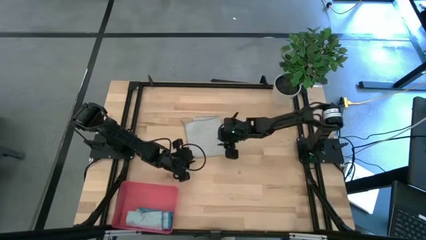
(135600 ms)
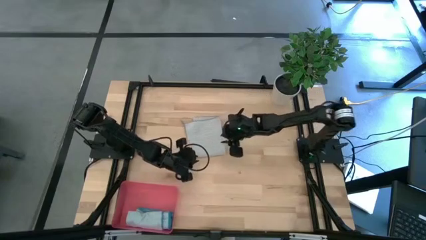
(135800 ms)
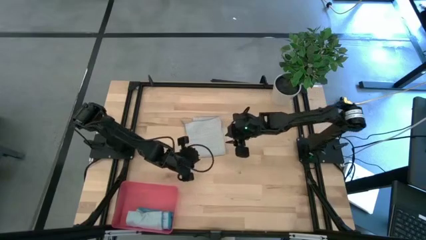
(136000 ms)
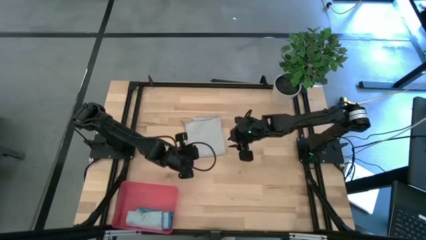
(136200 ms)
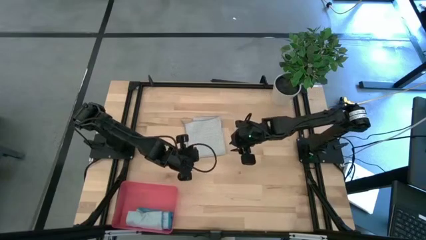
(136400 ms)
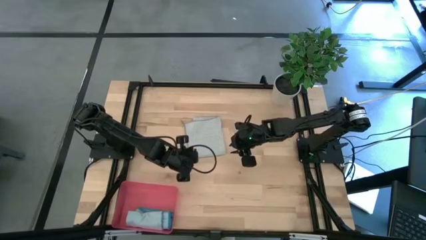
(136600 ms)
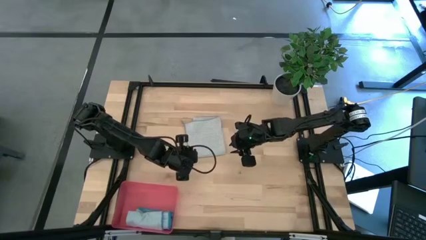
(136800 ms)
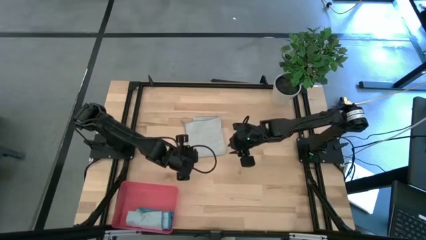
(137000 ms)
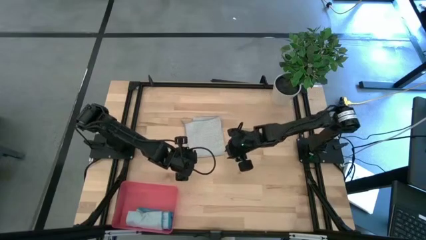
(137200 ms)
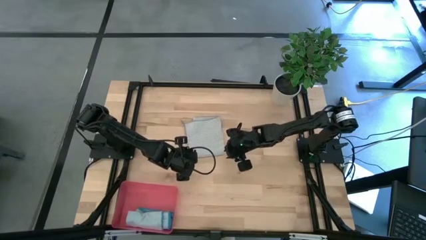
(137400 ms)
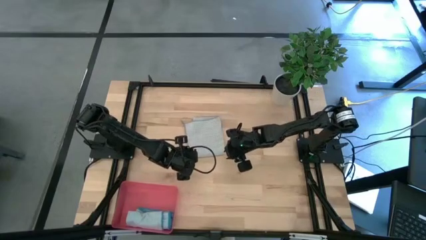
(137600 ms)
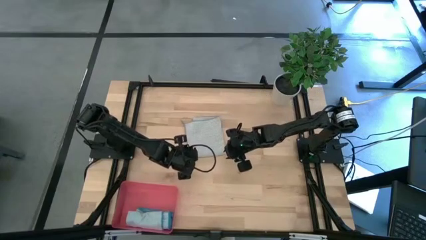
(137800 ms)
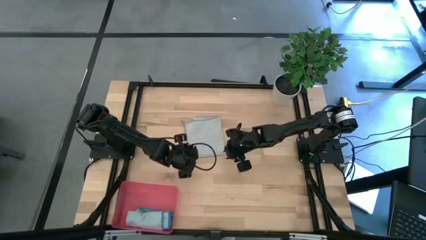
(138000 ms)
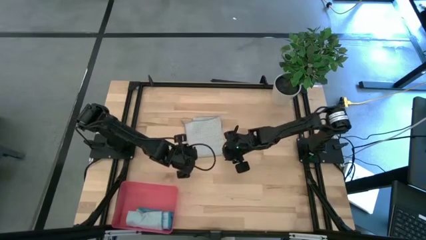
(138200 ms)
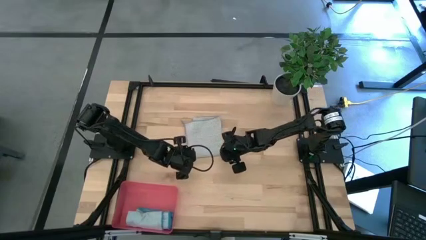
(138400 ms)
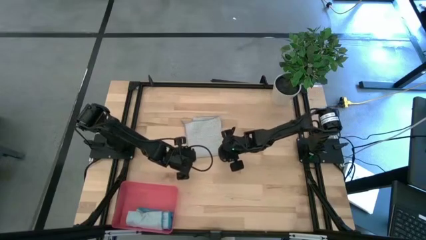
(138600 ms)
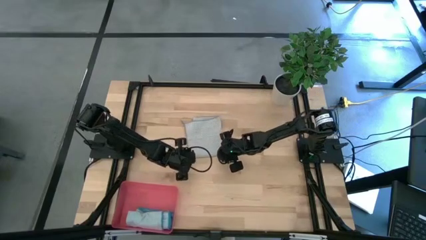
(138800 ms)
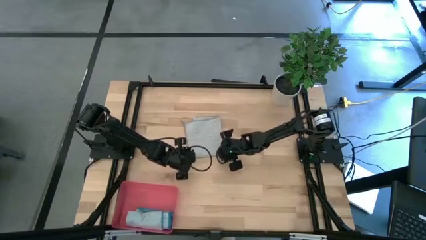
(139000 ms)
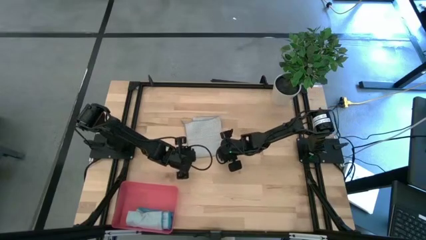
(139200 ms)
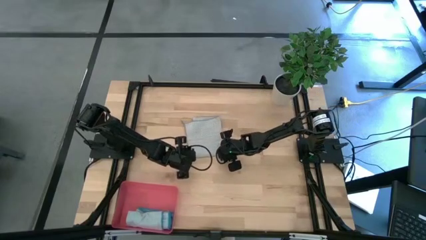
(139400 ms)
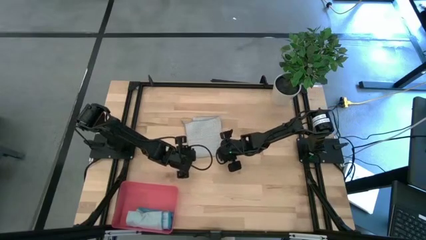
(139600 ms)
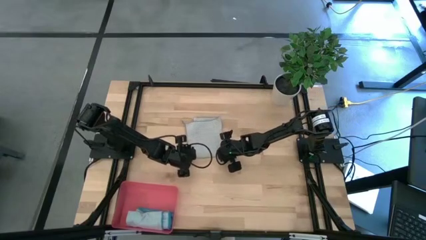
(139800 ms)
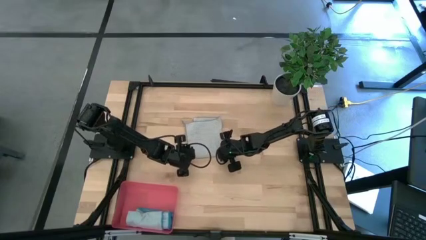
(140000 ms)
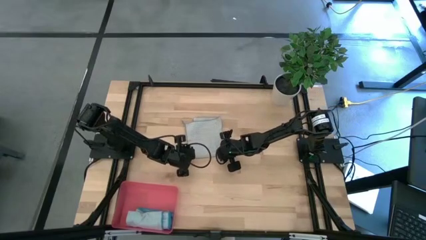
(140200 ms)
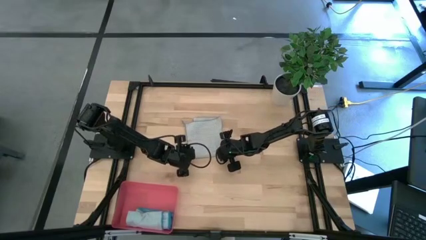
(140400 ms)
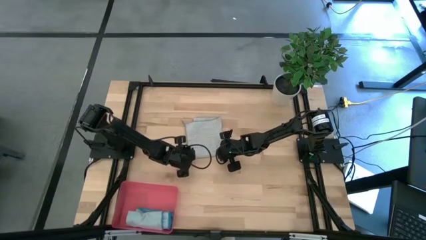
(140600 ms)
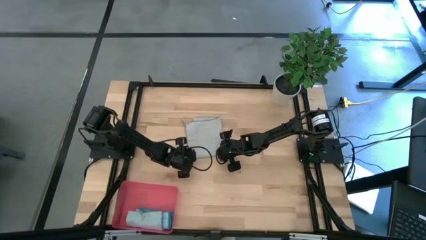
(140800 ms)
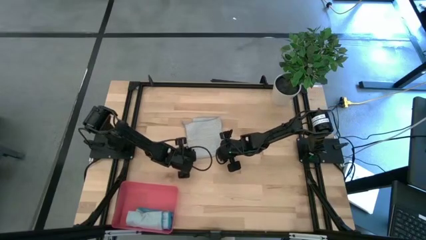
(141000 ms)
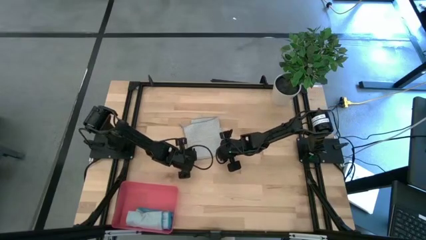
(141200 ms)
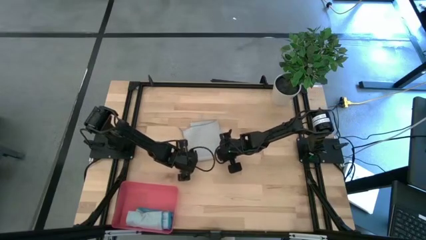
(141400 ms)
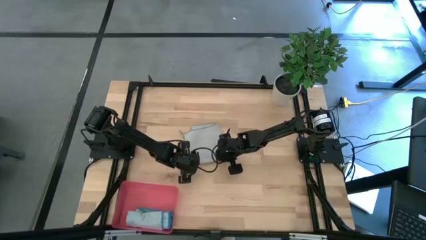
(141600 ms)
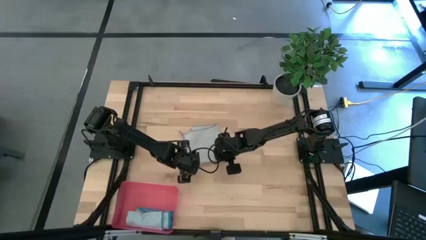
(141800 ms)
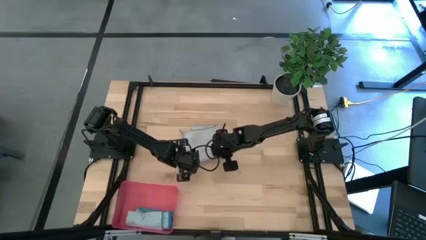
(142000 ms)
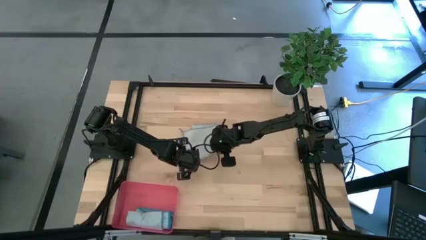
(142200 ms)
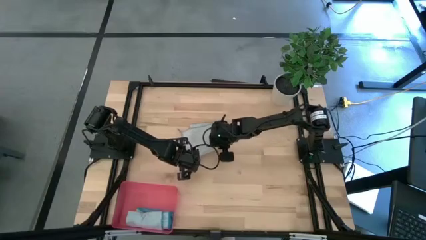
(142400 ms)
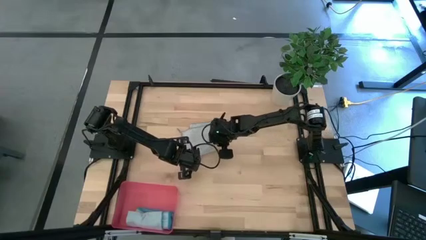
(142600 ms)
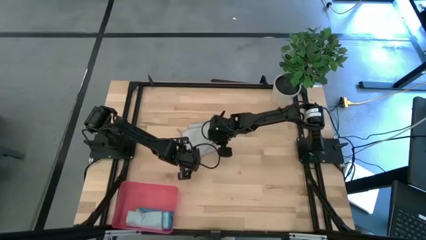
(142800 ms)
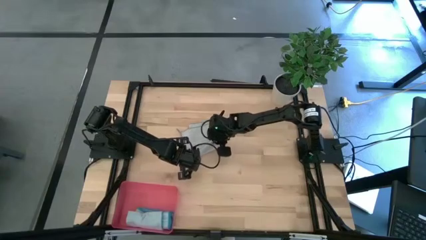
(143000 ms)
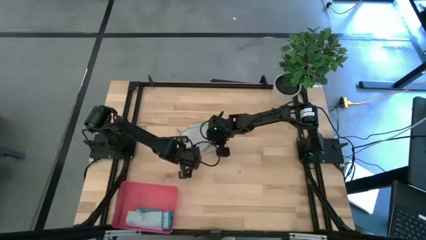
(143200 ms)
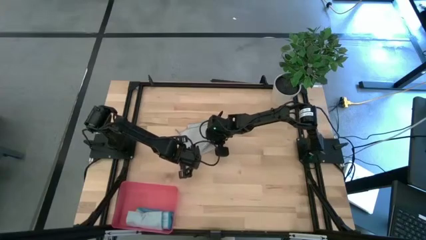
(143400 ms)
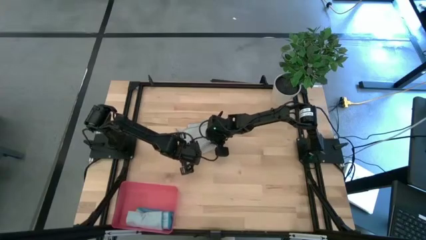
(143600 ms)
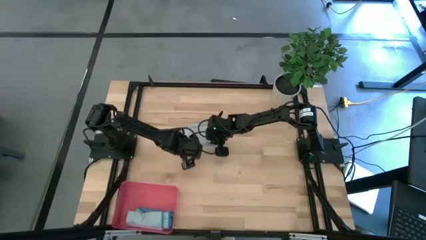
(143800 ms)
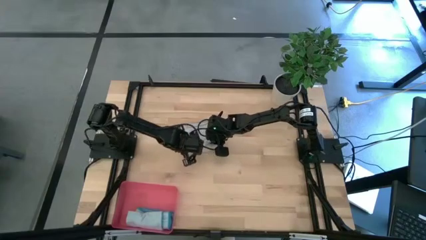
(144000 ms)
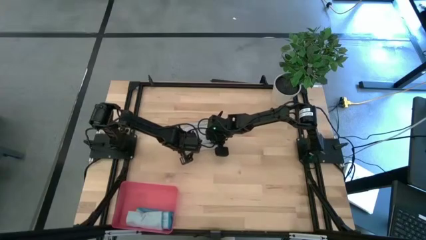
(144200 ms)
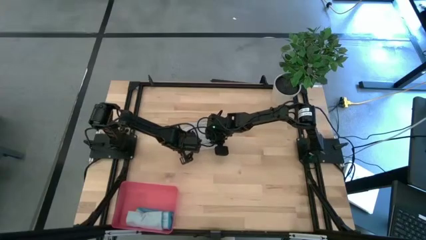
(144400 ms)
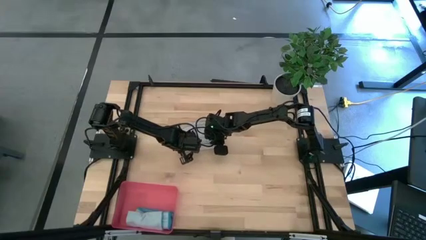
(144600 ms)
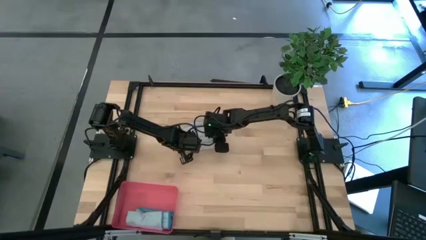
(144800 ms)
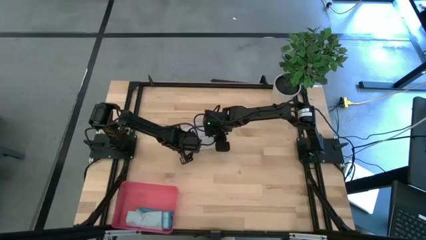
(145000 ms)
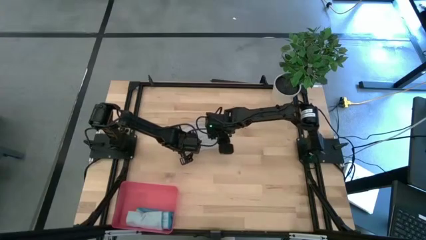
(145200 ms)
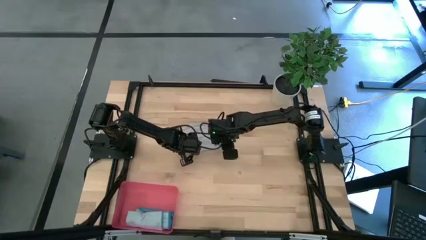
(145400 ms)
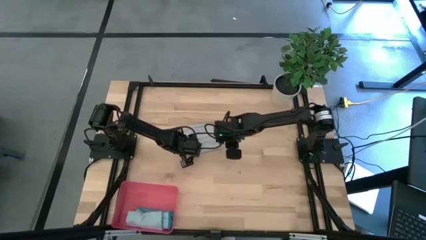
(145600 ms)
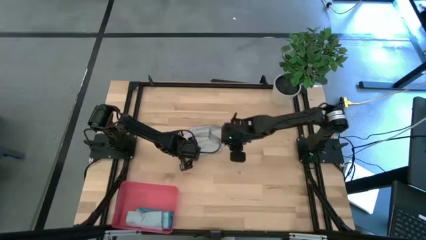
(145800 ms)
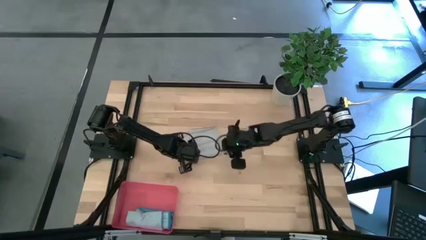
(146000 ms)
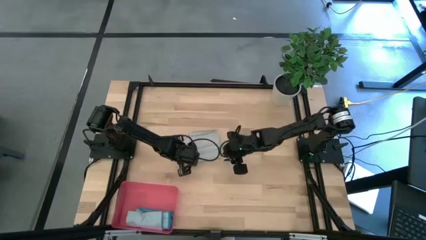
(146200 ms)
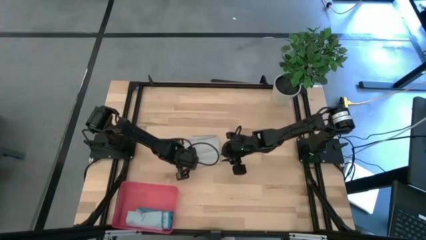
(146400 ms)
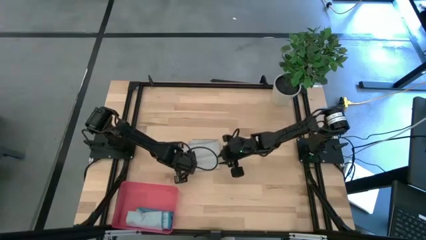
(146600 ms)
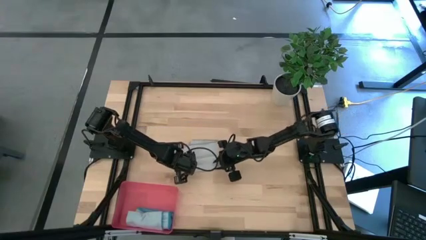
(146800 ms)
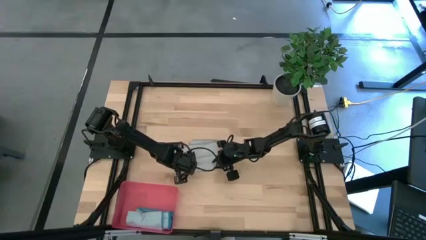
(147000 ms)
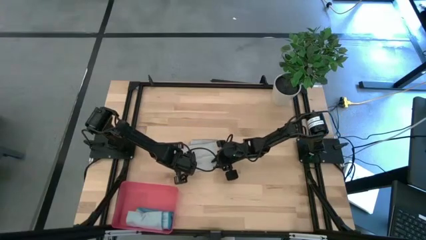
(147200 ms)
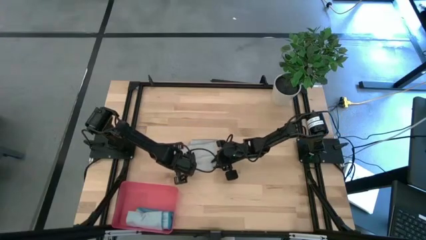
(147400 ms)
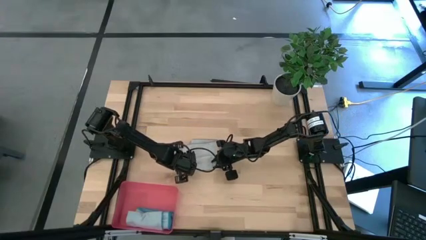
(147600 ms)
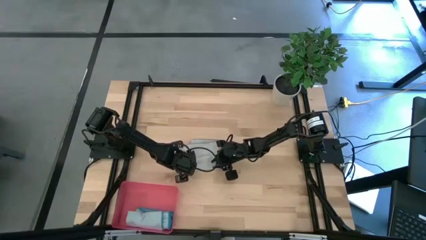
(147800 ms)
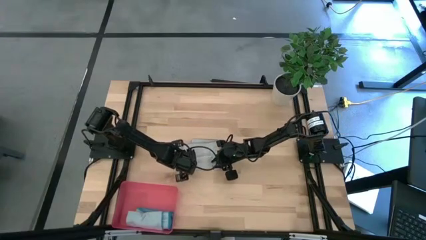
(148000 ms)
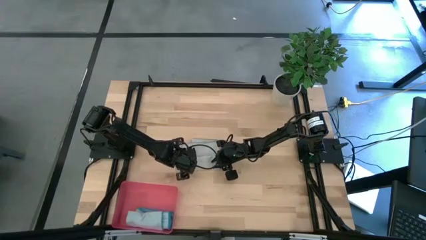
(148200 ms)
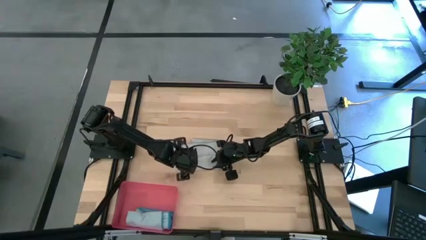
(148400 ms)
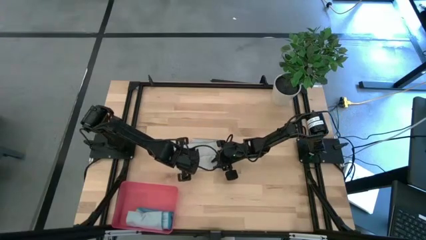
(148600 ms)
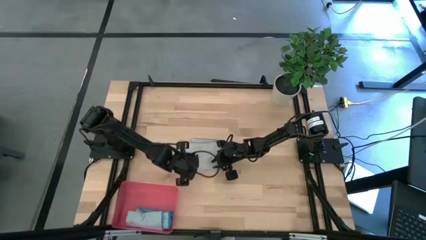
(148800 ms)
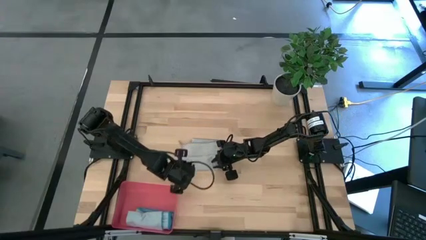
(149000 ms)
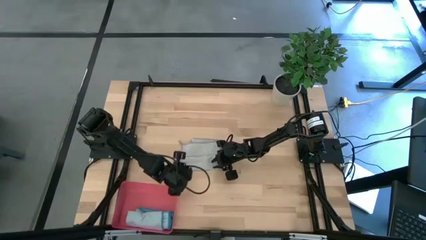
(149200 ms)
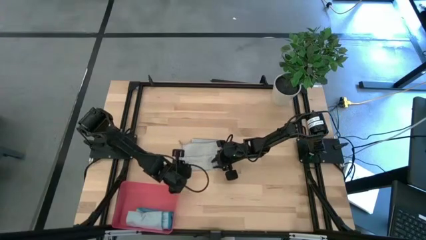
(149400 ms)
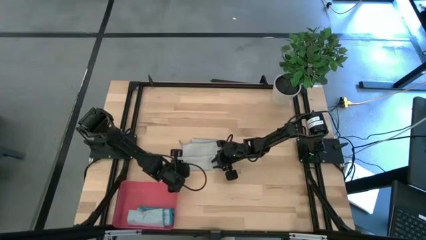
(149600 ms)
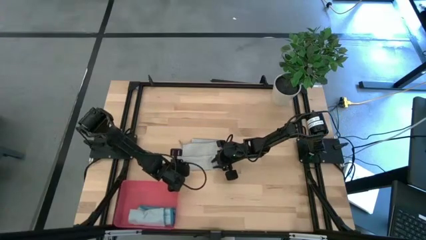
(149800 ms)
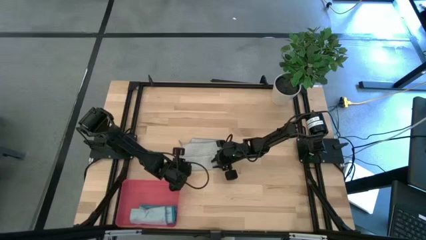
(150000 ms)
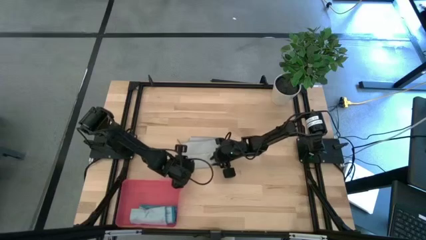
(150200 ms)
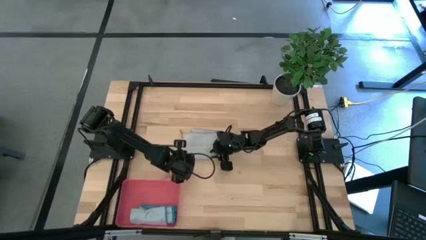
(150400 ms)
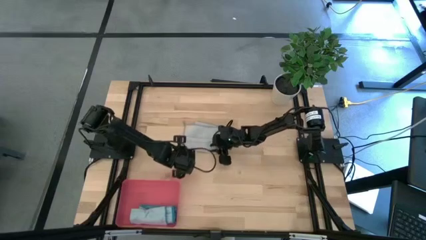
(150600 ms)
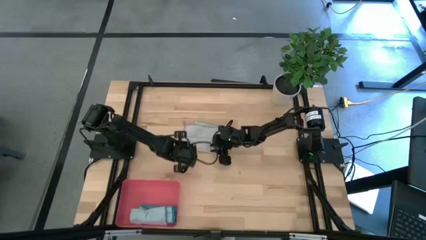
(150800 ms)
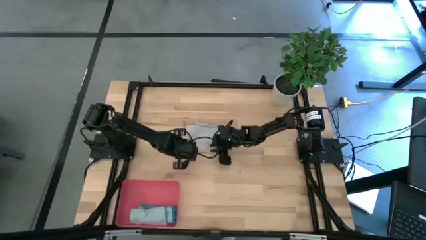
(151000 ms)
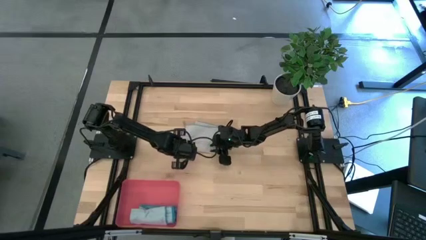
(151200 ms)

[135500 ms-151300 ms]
Task: Roll microfiber towels into tight, uniform cylinder then place into a basket
Roll the gray towel
